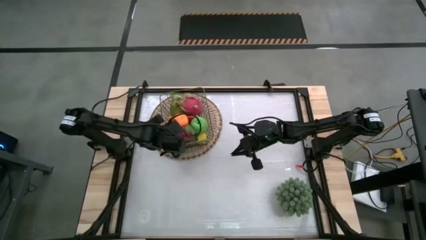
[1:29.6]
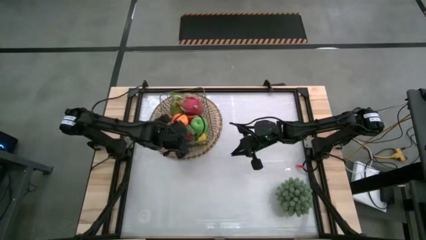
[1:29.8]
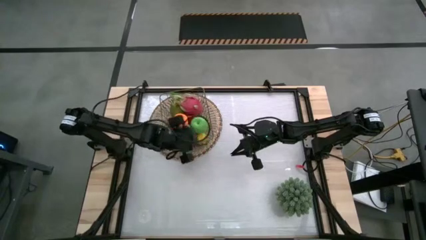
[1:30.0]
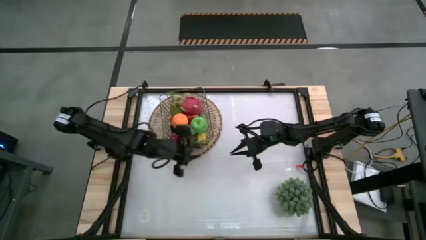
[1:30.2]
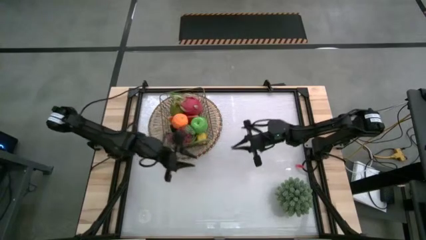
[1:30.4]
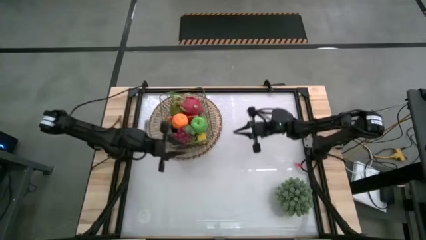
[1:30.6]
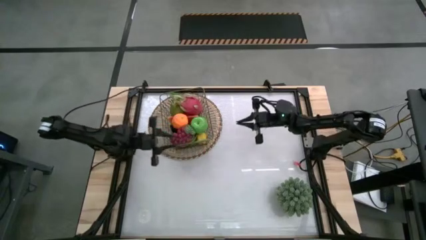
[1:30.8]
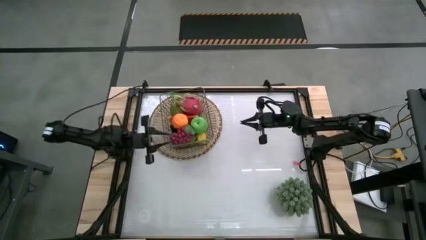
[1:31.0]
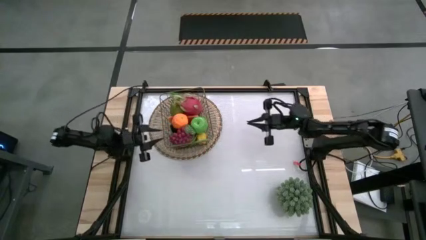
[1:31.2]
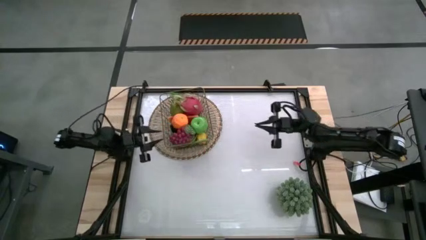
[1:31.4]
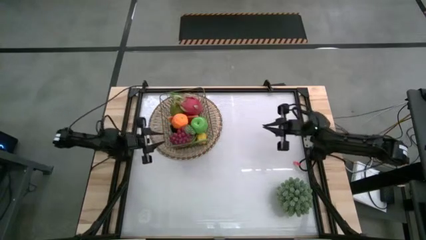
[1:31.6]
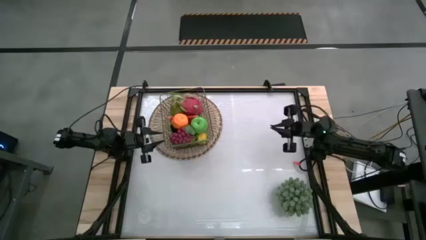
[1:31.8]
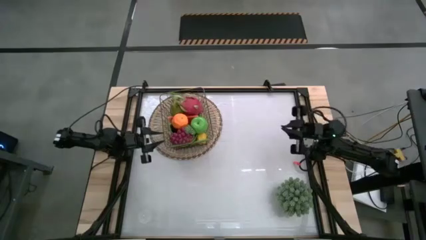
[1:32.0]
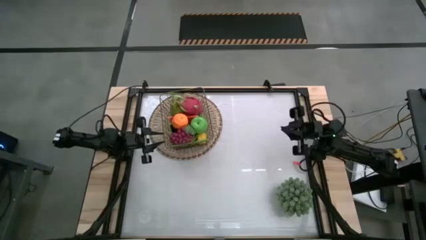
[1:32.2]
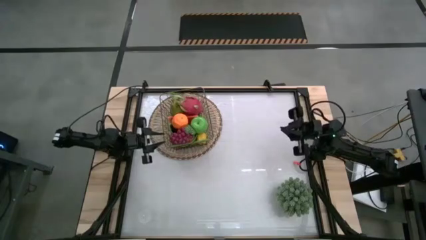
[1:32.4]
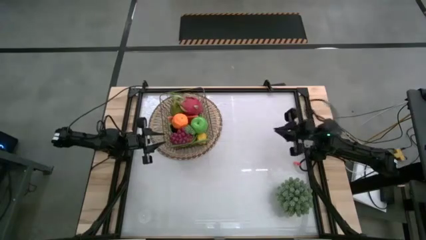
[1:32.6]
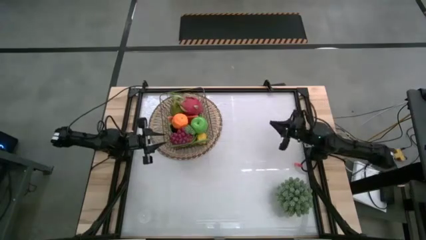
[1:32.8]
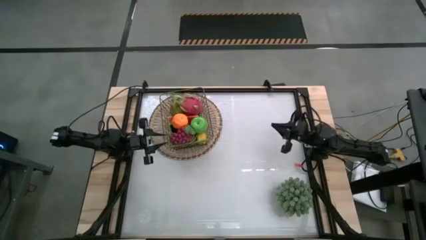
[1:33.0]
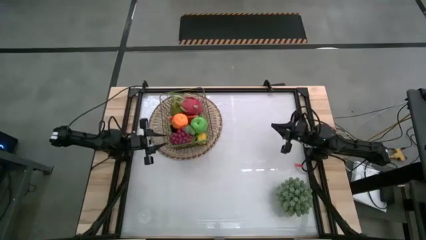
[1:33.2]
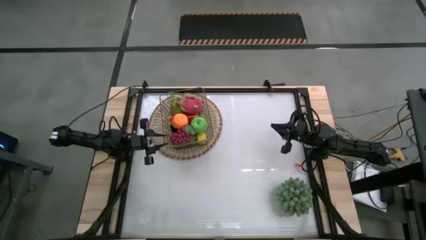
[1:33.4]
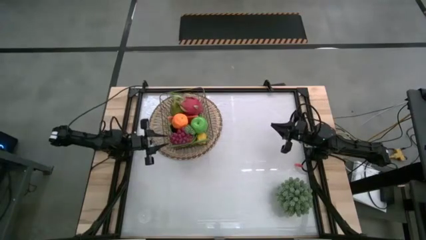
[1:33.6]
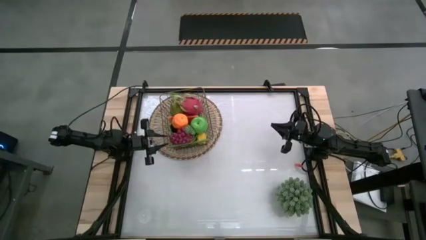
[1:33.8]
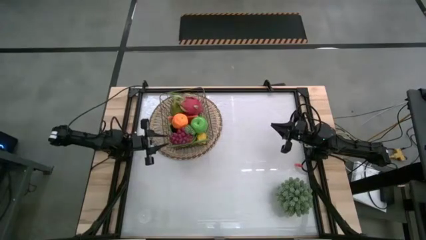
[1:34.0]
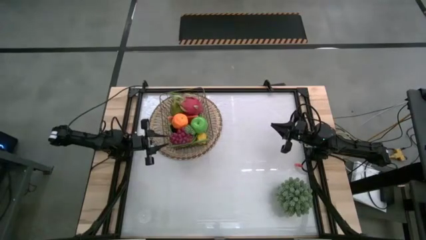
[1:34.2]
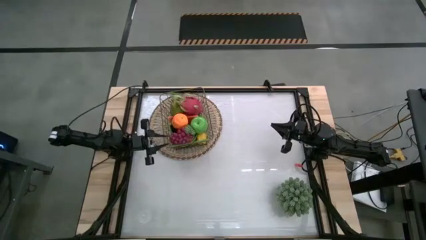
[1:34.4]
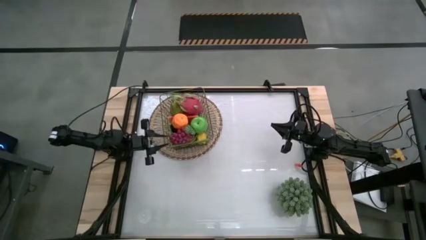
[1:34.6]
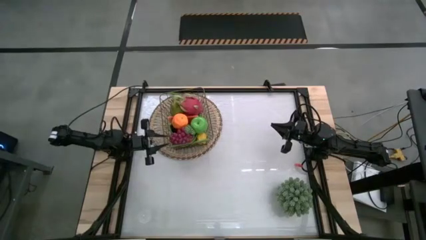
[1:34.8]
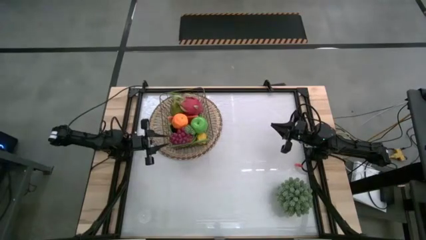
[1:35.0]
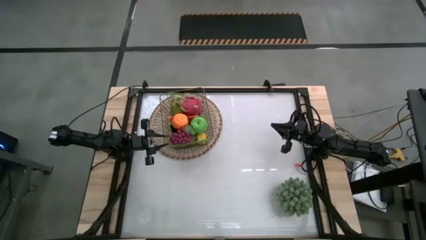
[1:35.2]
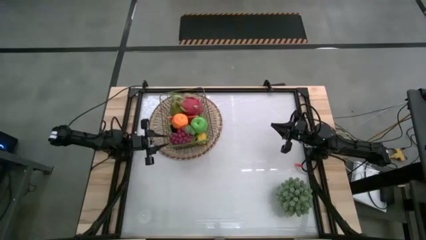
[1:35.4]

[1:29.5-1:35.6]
Task: Build produce basket
Return to Home Position

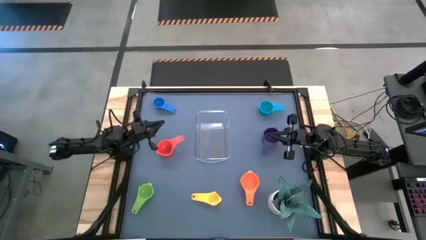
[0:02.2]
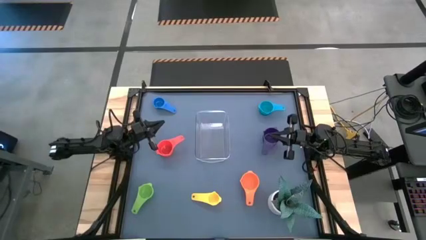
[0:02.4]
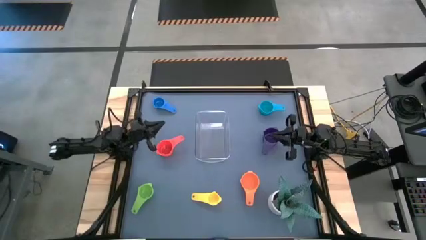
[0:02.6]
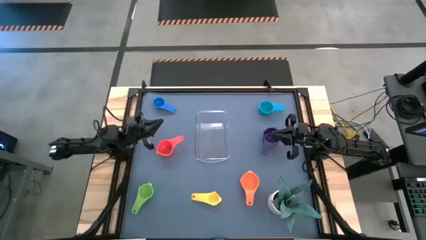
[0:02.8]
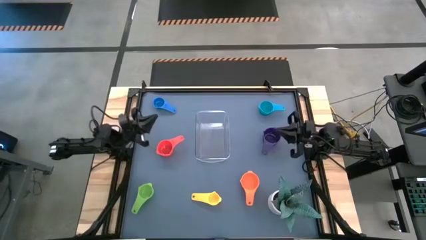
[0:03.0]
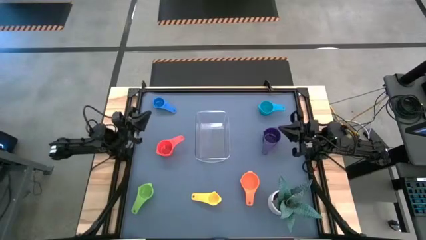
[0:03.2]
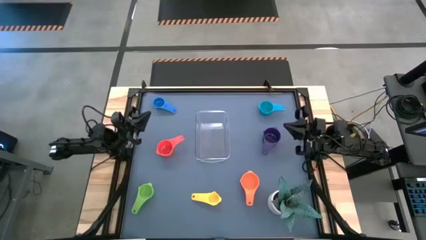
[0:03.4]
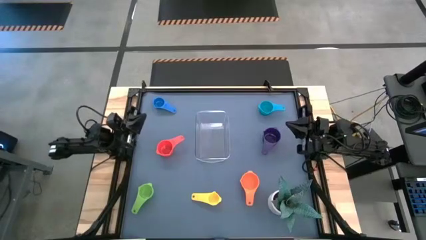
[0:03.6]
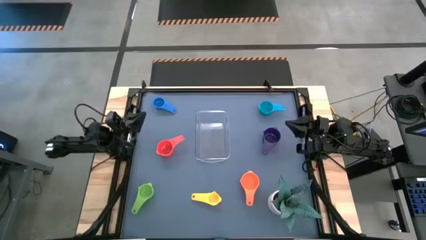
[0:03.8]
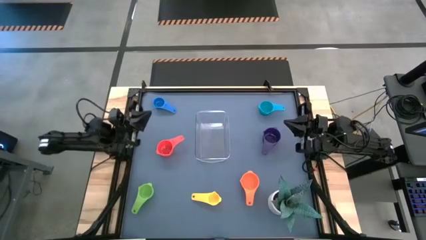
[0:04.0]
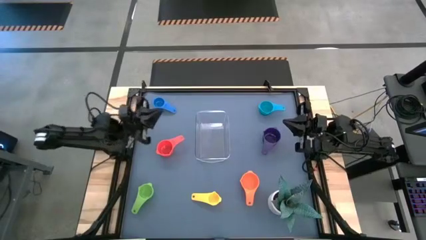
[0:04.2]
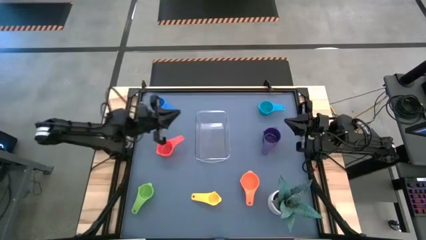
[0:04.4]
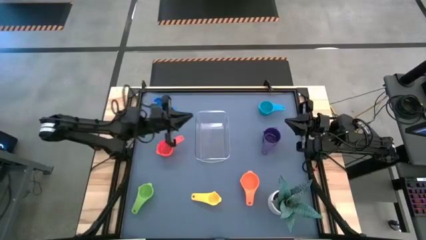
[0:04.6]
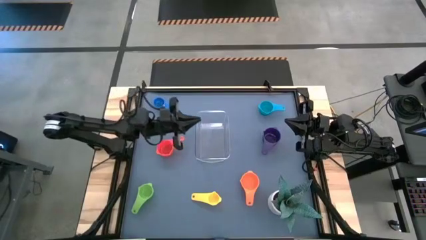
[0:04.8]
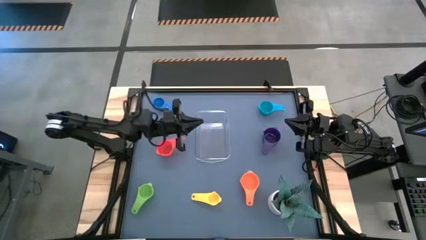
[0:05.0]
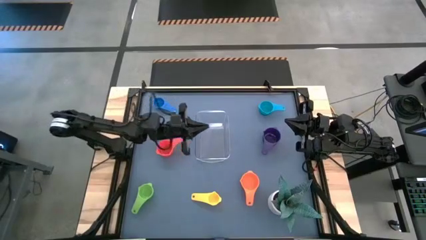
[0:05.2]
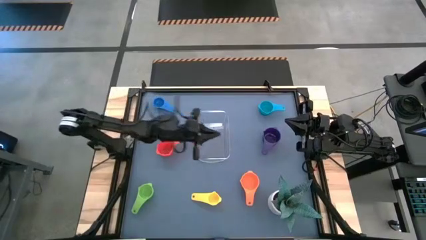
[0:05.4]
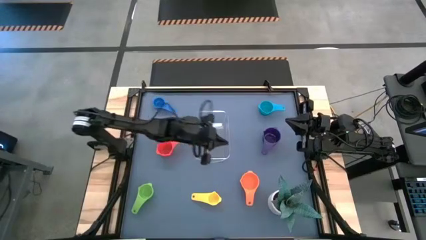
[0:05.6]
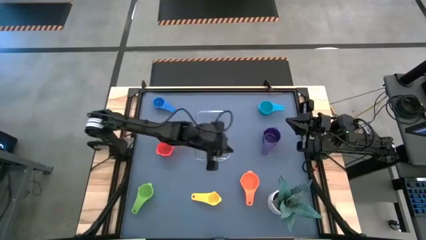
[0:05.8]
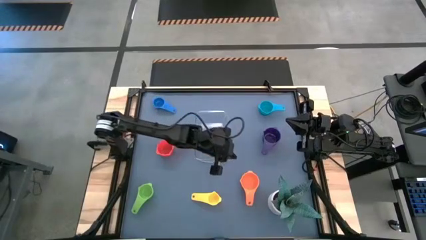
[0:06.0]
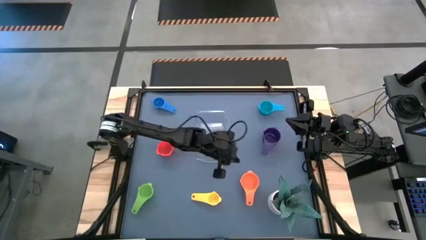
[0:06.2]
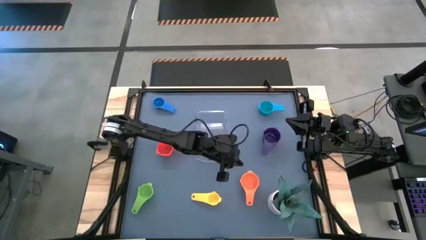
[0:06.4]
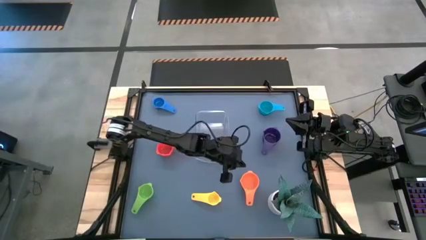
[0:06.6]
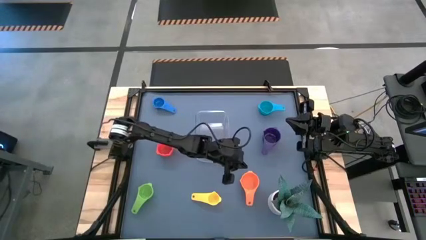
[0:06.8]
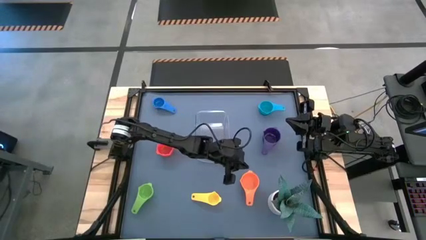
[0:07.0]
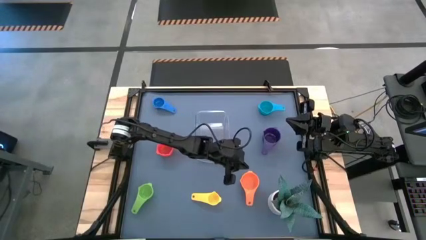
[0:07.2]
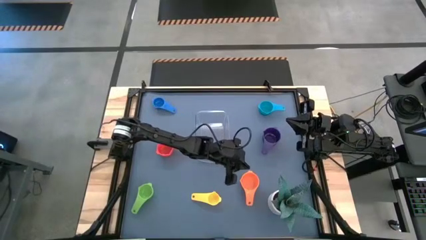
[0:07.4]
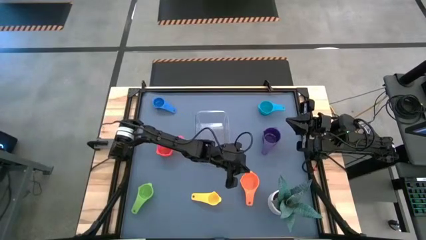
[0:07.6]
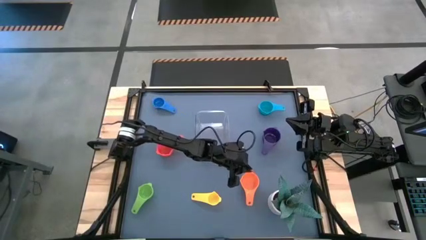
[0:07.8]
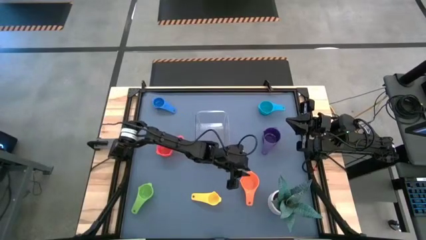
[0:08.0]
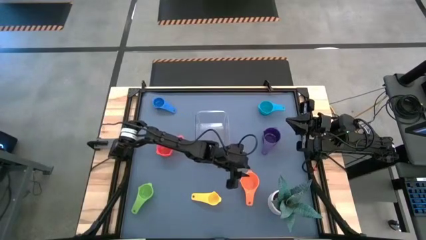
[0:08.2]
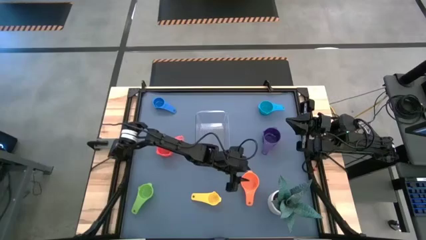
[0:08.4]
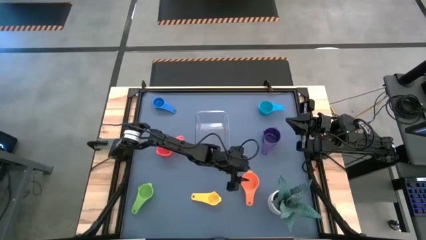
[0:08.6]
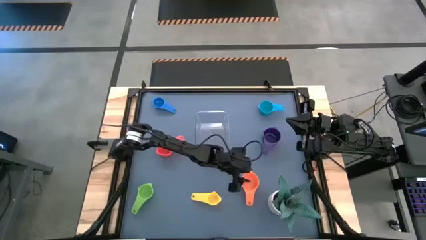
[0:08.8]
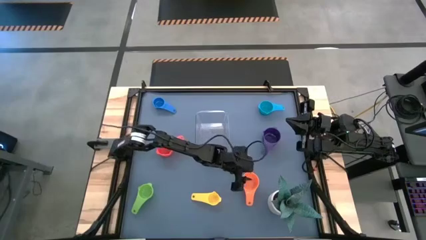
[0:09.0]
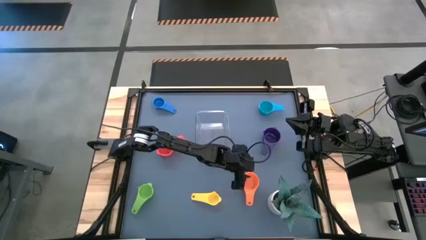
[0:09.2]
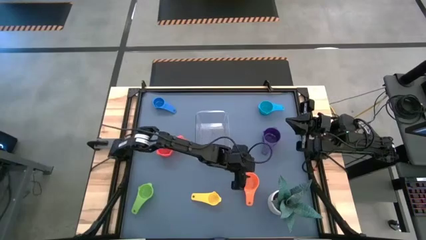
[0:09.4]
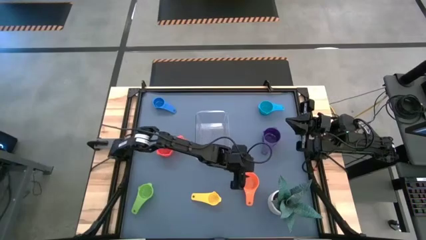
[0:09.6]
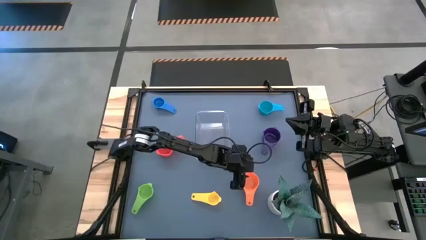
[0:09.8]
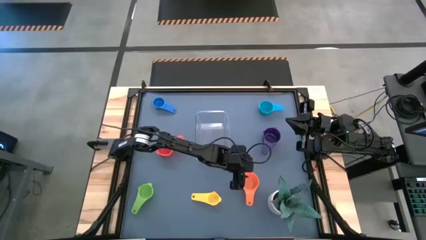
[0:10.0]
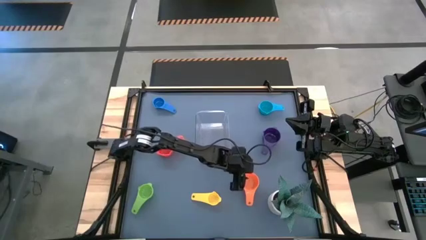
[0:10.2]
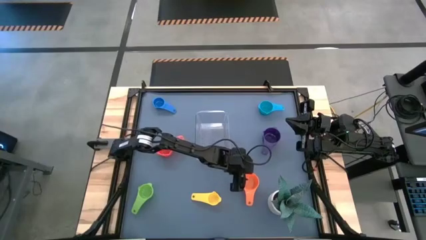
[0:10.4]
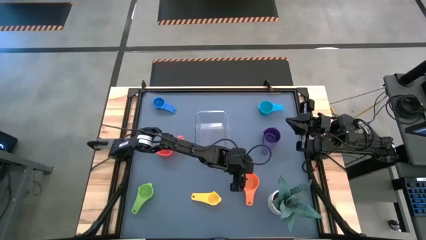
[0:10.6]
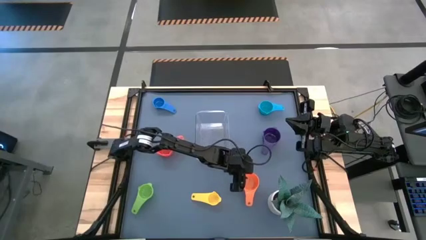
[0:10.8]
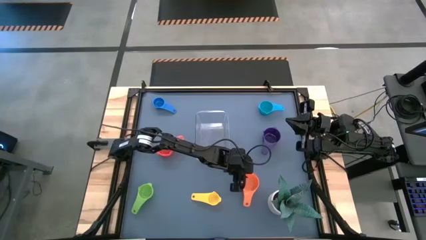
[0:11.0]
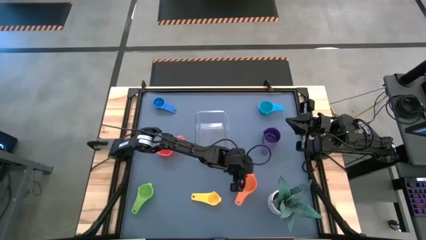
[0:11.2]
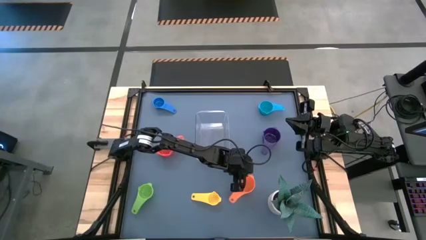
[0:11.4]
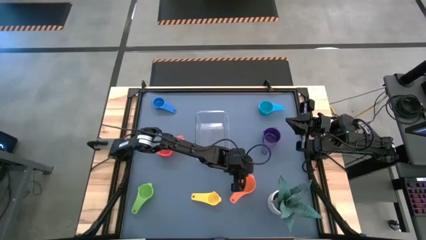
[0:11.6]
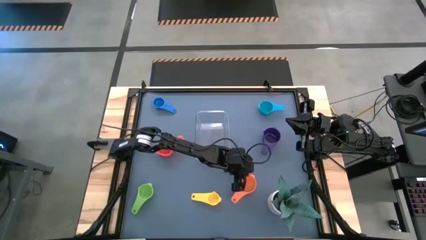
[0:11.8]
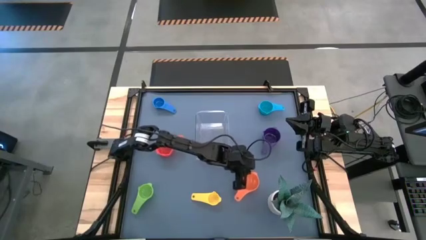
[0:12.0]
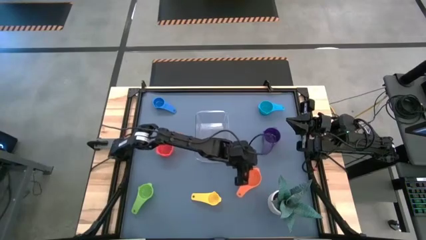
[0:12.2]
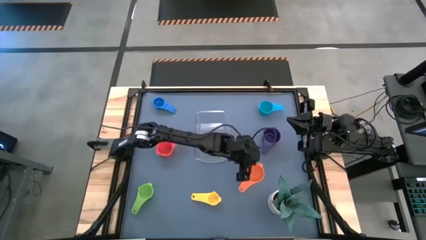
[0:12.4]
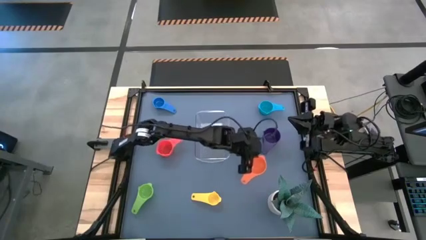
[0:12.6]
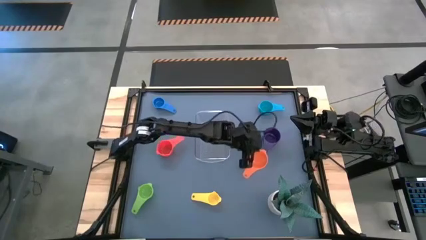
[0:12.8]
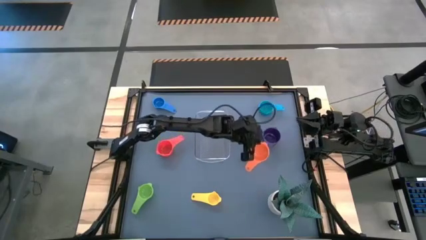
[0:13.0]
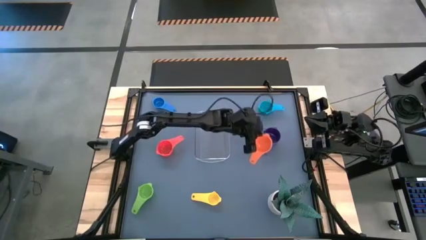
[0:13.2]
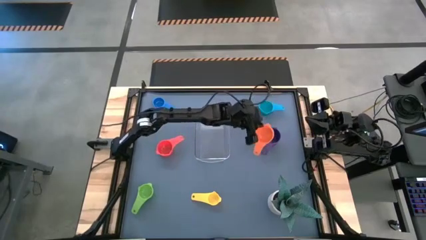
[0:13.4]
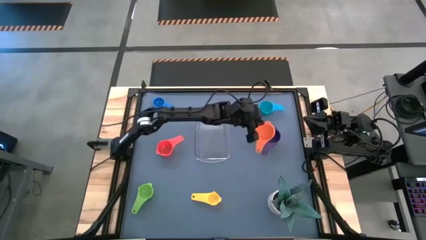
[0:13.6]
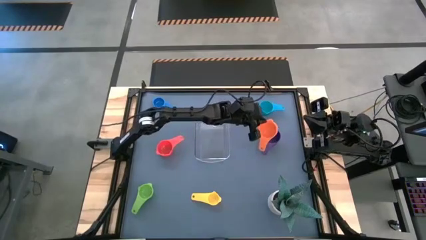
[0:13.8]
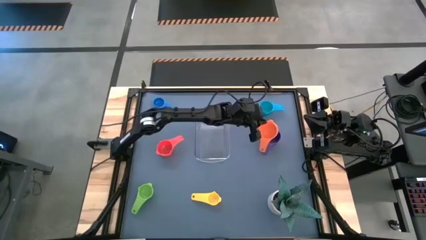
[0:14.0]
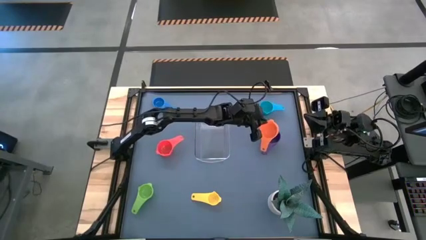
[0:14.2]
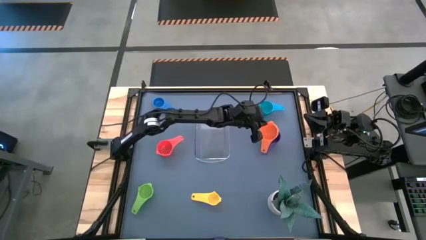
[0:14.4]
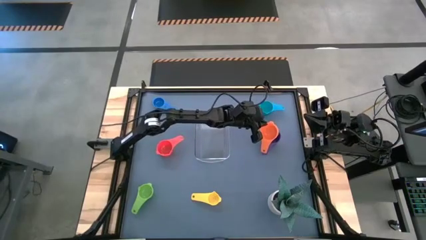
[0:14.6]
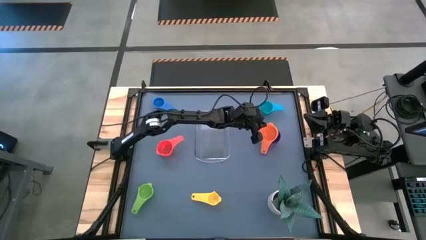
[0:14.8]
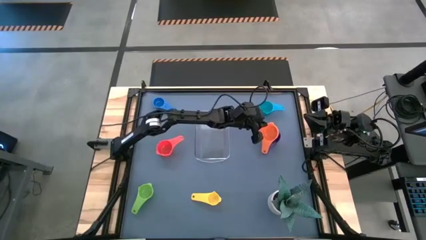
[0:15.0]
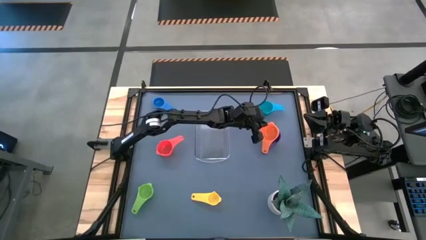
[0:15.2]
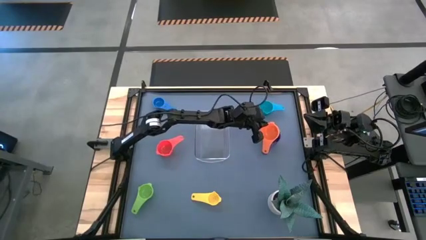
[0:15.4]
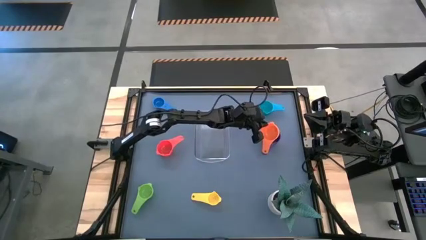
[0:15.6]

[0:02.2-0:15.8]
Task: Nest measuring cups in basket
Stack the orange measuring cup on top of the purple measuring cup
